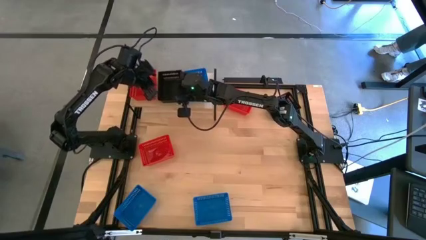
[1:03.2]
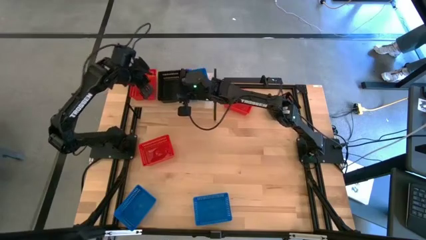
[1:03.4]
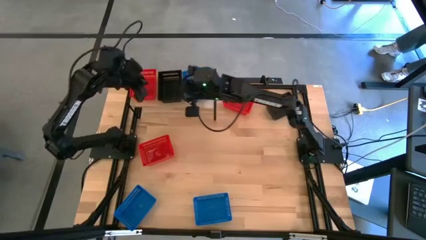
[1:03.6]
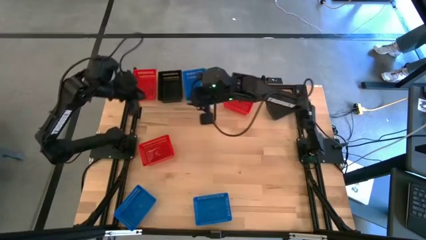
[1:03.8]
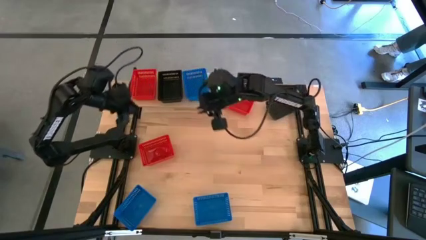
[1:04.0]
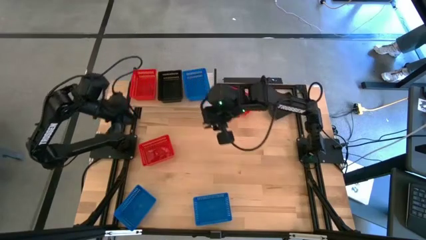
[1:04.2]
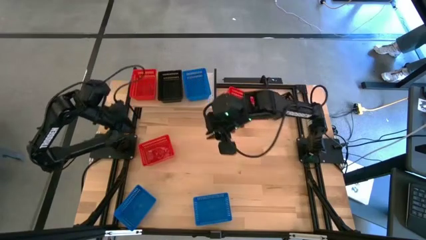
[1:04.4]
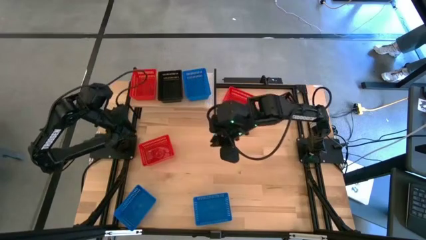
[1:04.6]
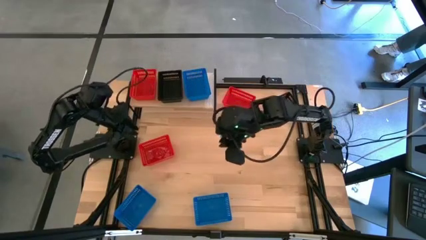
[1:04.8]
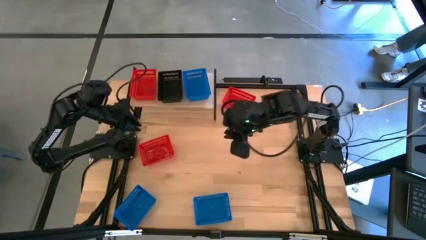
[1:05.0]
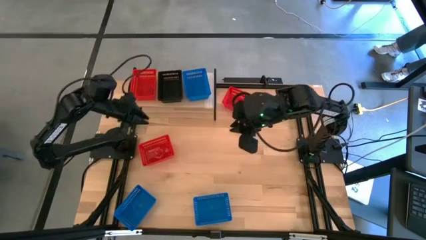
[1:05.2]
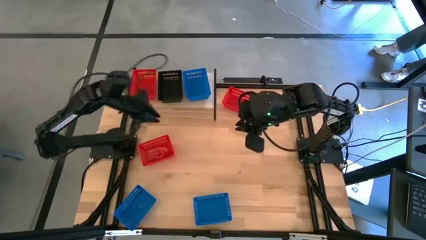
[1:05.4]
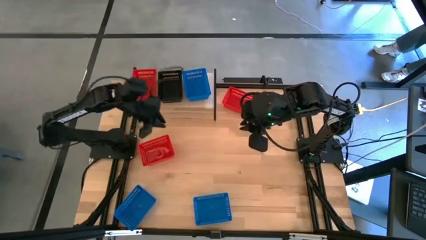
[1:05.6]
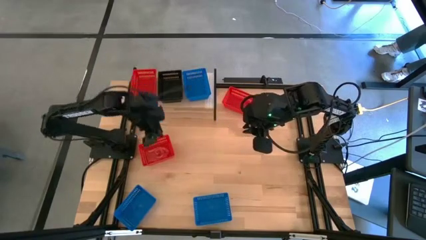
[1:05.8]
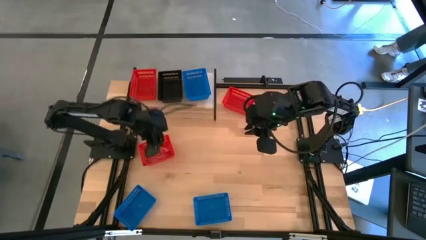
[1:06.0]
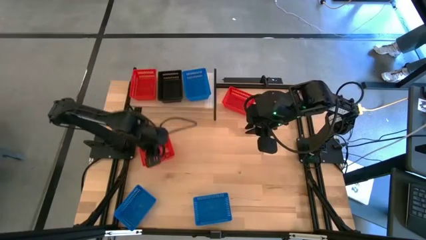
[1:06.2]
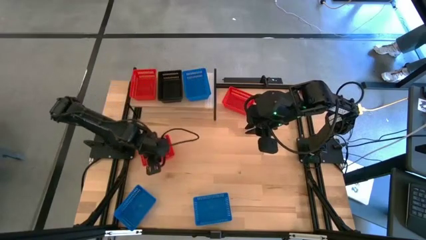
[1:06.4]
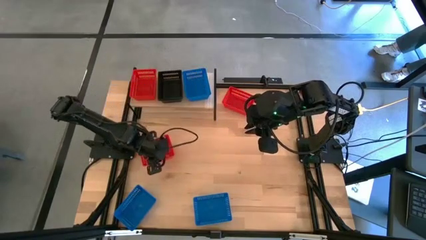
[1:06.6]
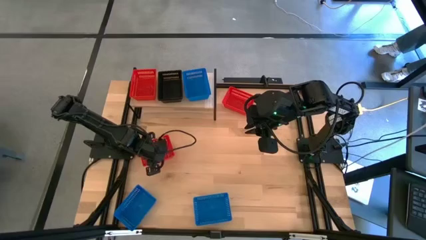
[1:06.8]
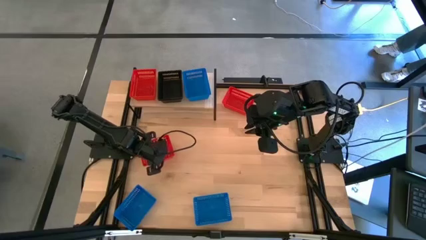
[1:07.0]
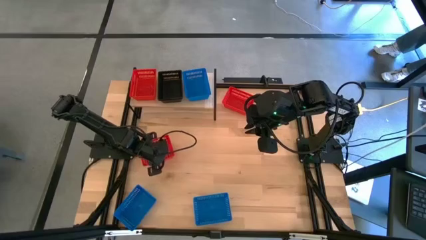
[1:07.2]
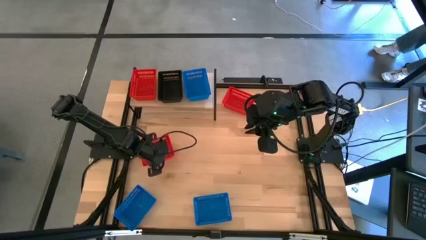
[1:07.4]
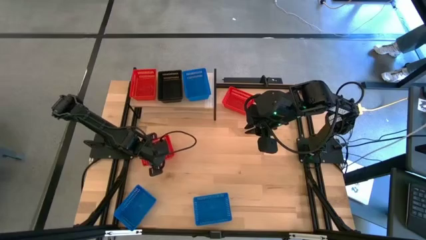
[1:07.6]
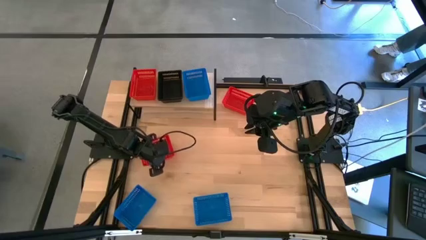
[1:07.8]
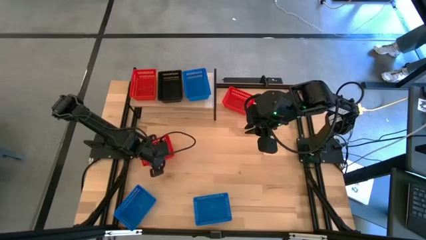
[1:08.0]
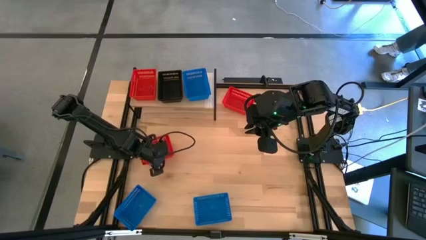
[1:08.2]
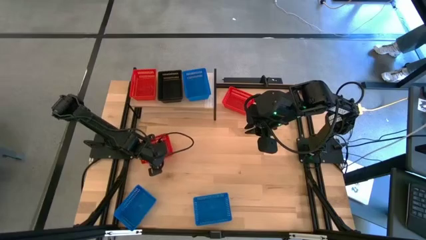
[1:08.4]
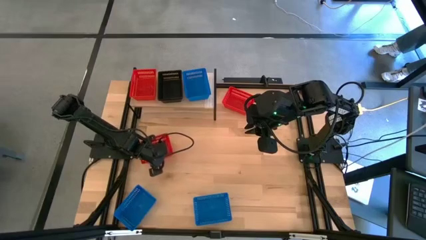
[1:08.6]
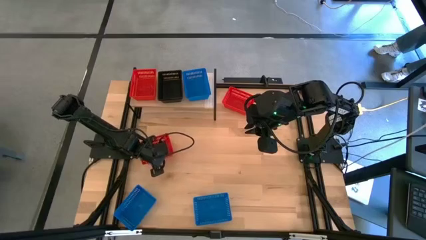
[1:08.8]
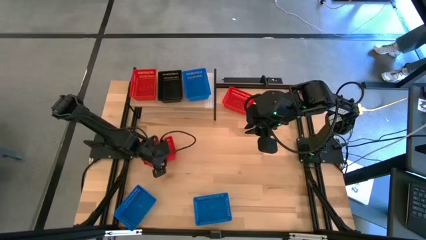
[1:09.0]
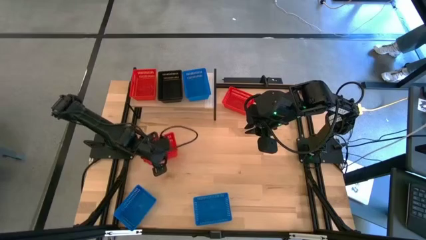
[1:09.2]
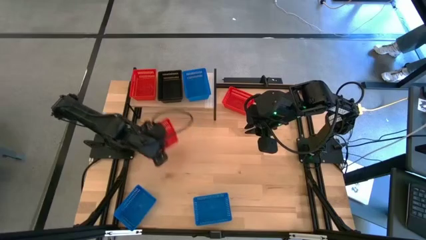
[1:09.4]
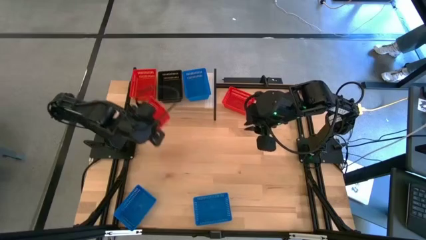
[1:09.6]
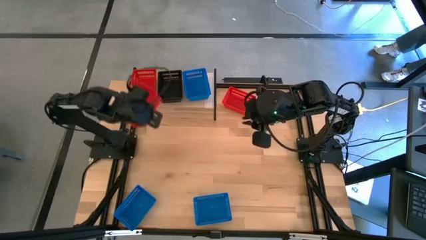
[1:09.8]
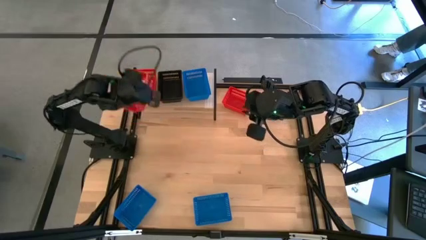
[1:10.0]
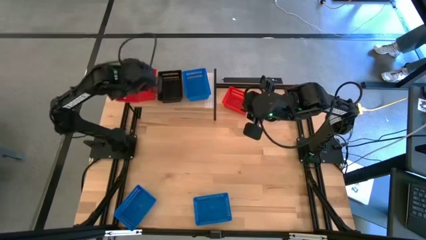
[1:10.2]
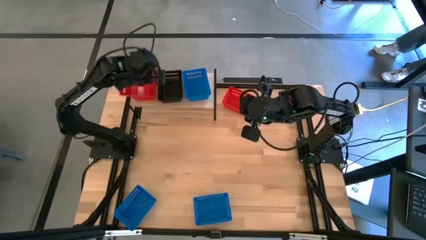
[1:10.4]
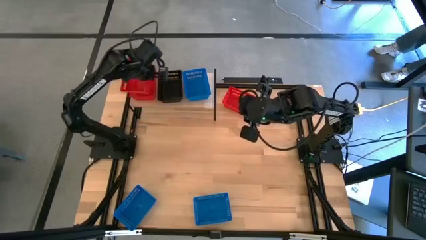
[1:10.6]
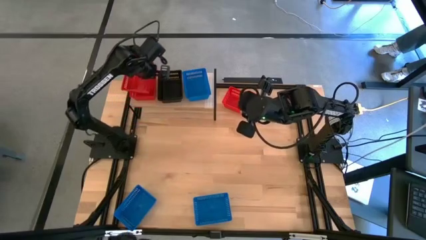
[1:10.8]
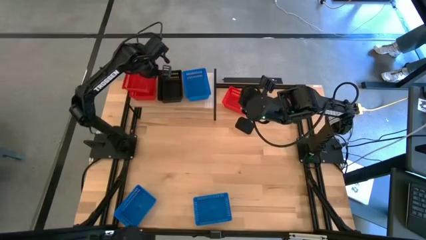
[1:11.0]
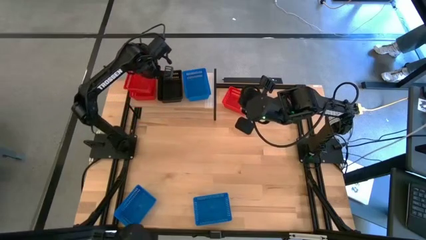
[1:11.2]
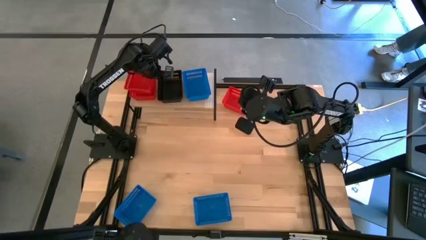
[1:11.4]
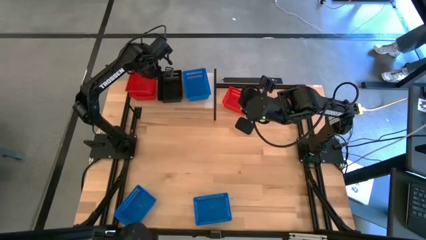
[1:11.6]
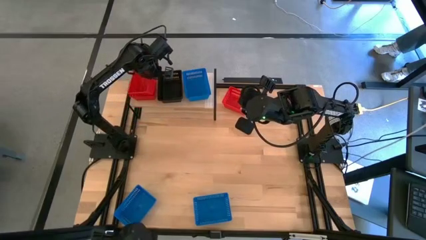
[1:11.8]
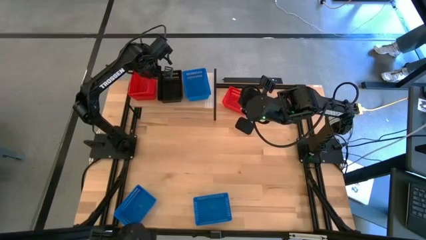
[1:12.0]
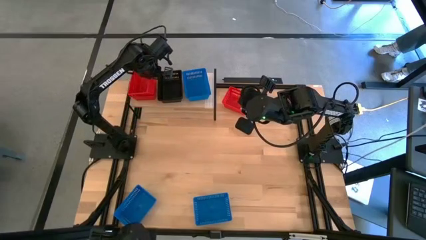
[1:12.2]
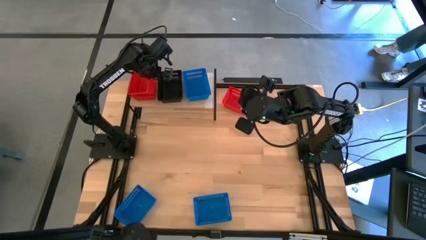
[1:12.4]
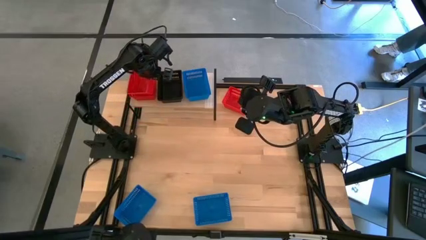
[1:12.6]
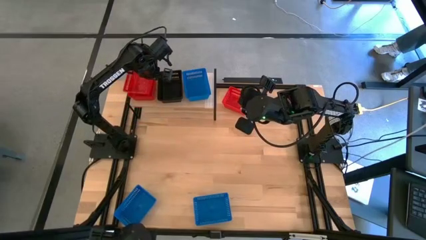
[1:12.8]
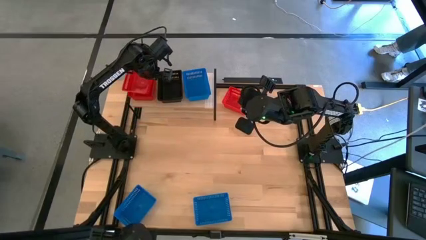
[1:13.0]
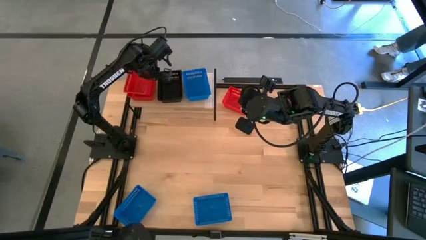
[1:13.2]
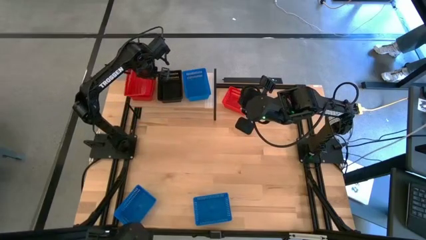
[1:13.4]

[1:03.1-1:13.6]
Task: Stack baskets on shelf by color
Stack the bottom red bin on the other red bin on the shelf

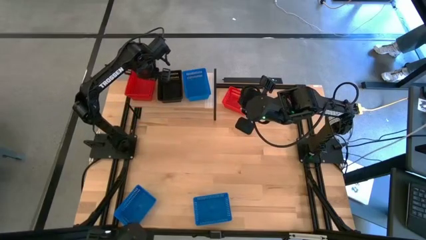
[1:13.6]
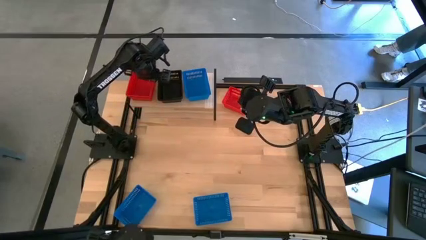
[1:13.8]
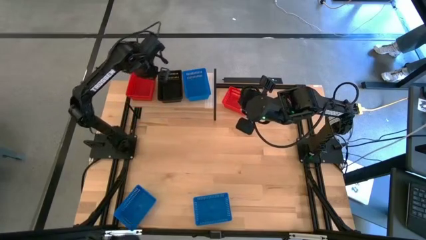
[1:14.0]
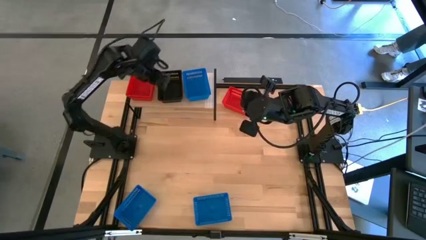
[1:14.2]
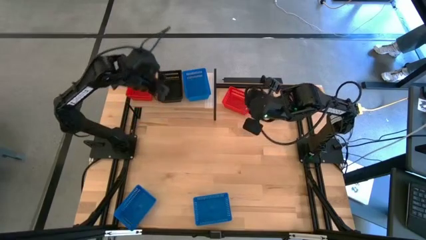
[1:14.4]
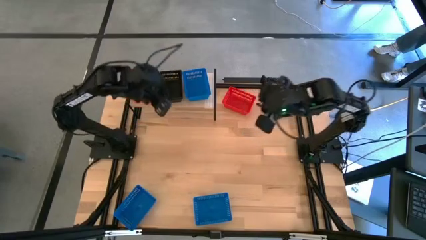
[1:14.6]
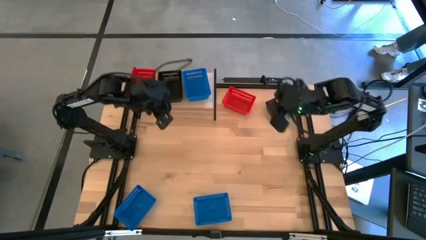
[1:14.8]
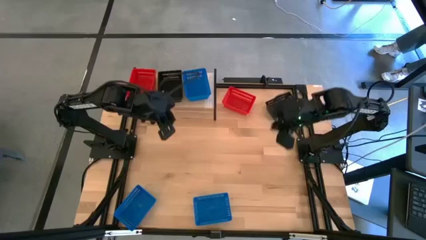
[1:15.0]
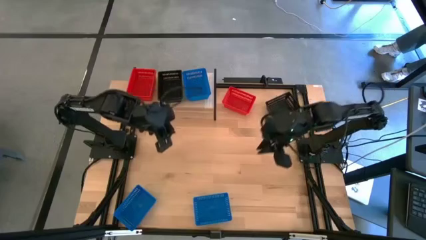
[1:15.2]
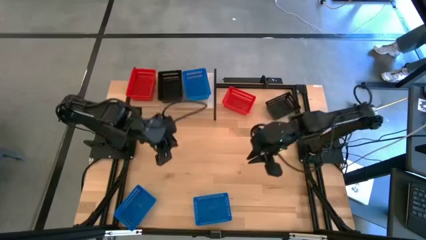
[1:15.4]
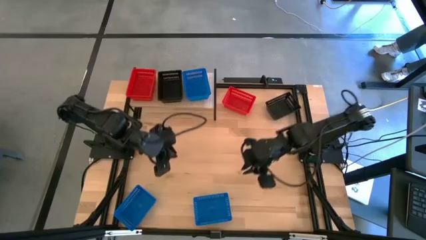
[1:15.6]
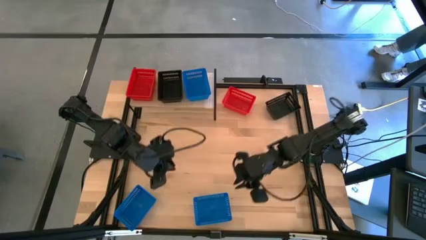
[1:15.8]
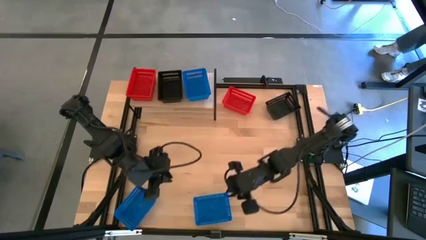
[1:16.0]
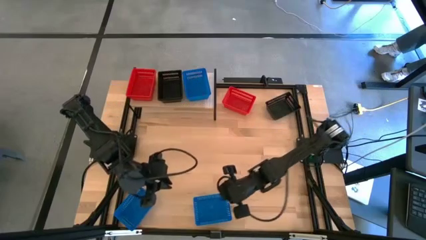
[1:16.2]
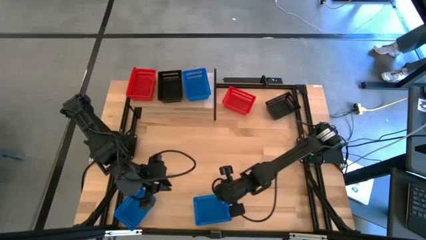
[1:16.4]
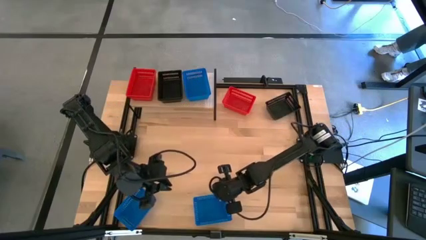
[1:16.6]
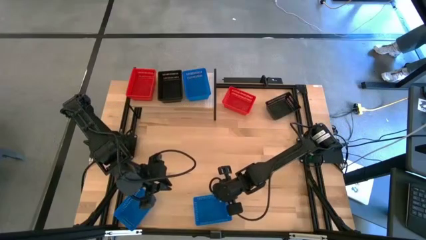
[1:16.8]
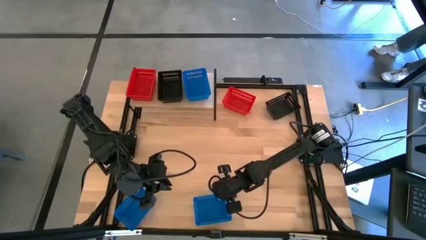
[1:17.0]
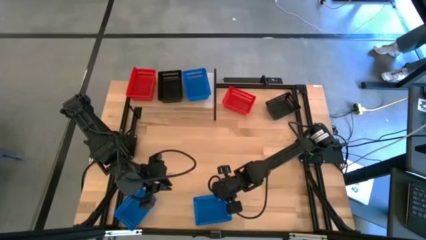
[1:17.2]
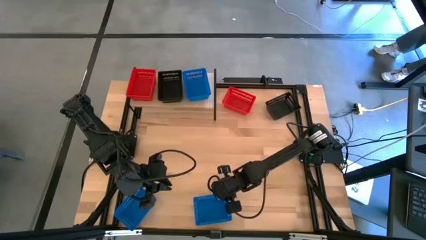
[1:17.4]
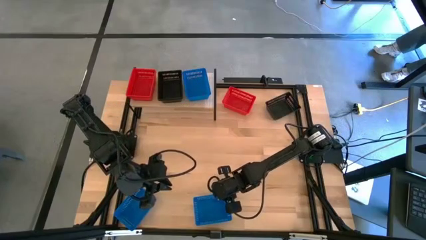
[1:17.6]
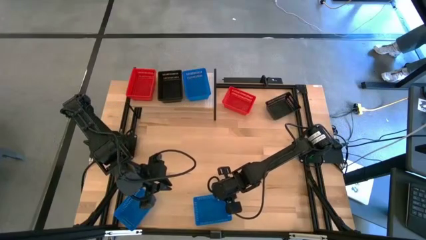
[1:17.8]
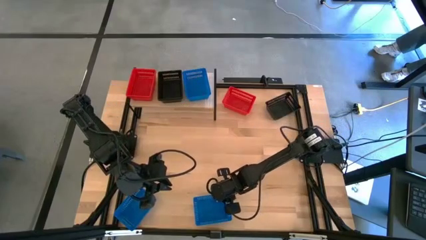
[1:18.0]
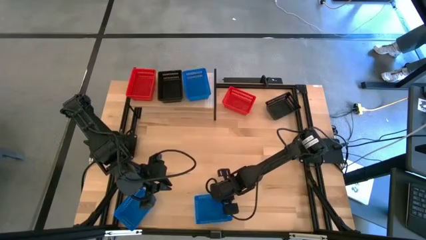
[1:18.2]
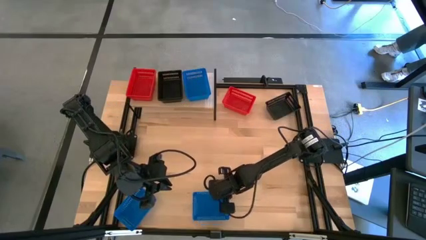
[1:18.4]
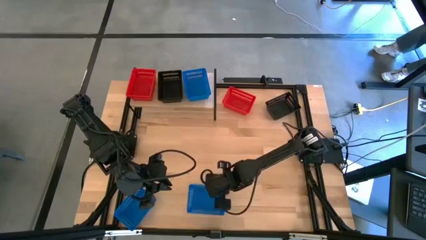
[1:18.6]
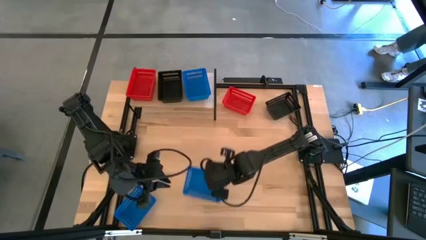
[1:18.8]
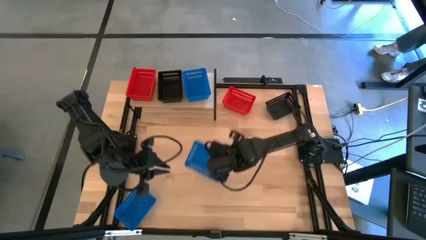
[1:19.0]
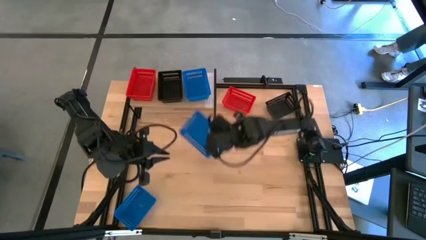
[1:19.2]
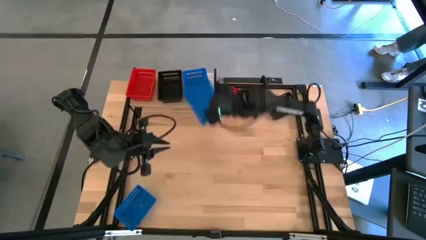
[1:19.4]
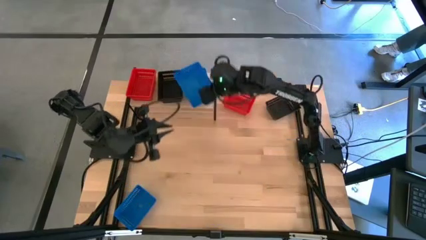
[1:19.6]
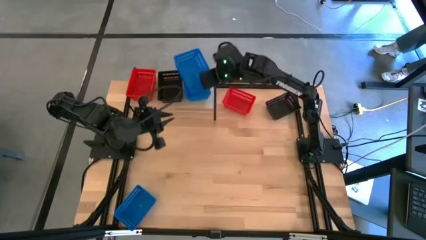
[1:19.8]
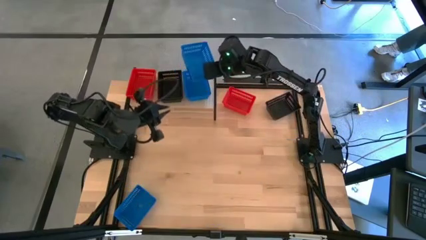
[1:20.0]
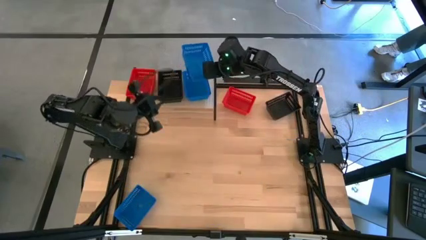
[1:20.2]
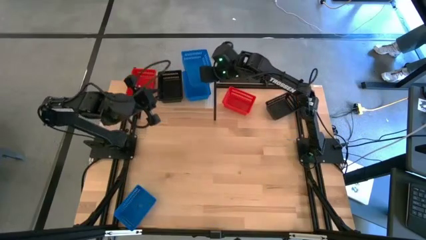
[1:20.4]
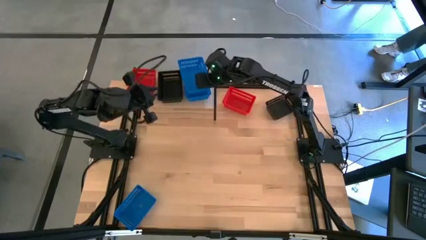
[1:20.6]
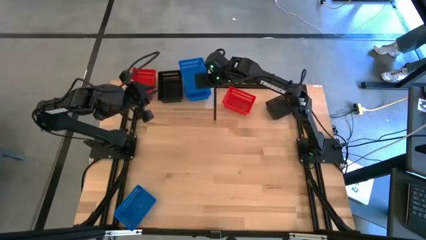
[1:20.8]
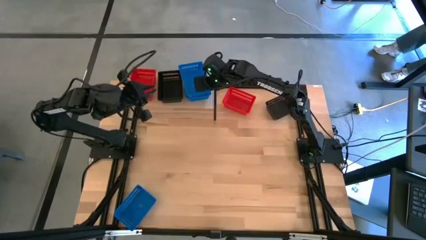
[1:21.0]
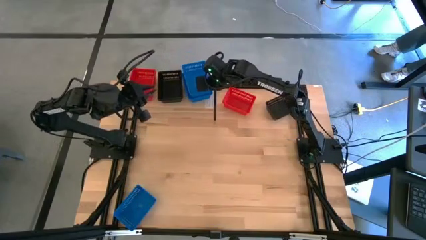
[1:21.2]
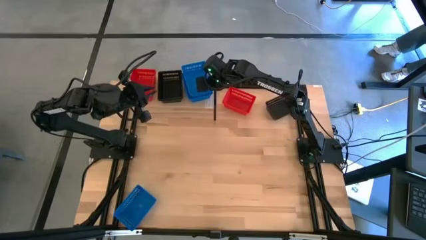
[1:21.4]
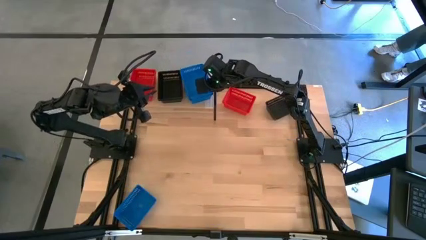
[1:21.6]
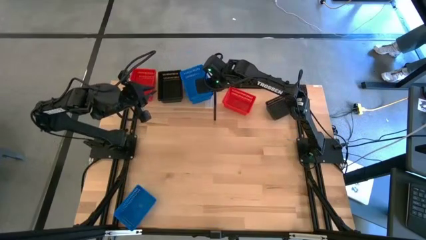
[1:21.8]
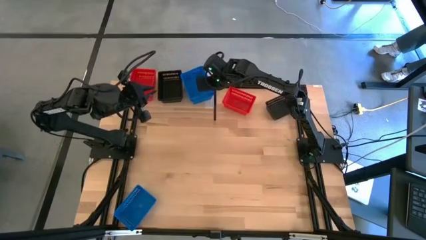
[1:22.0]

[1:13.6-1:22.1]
Stack the right blue bin on the other blue bin on the shelf
